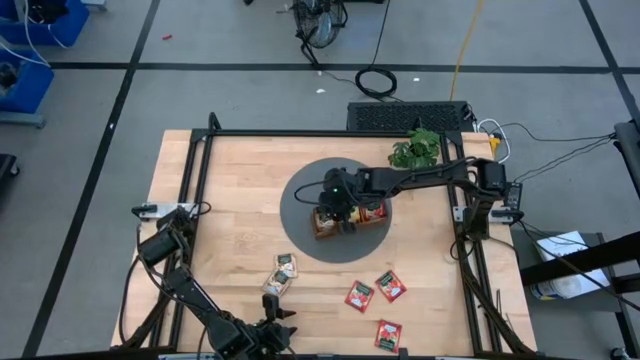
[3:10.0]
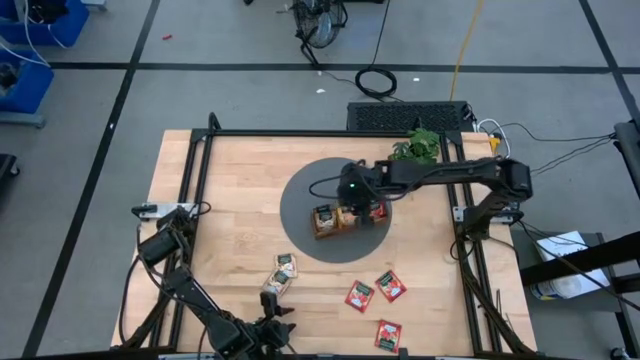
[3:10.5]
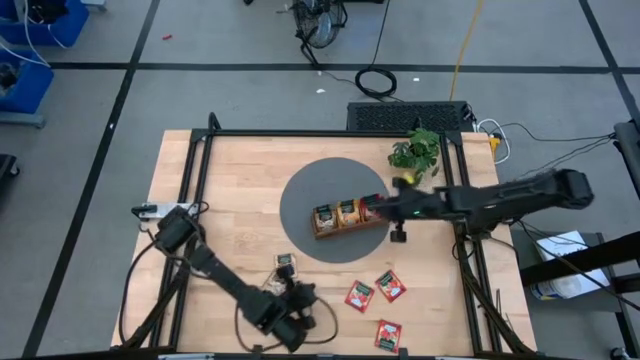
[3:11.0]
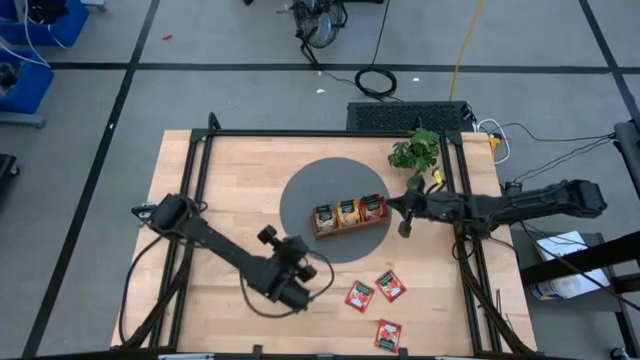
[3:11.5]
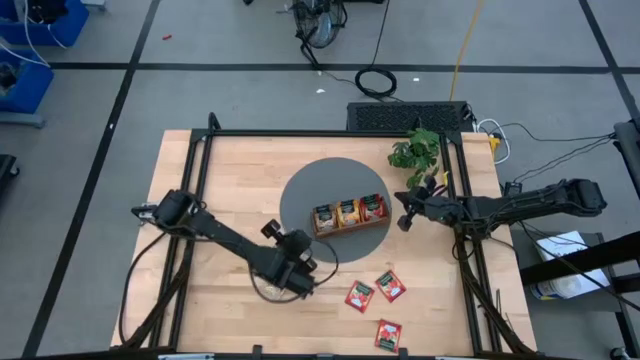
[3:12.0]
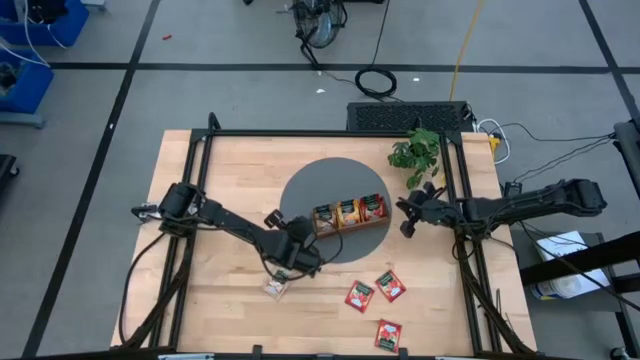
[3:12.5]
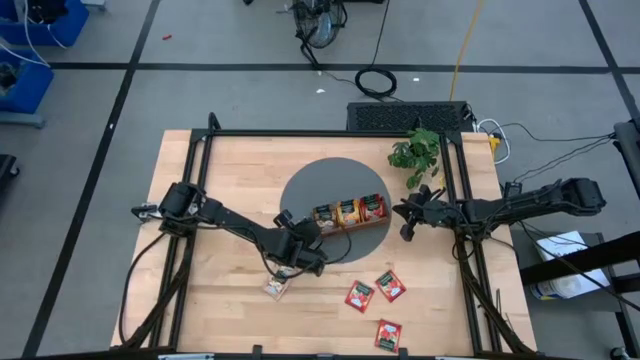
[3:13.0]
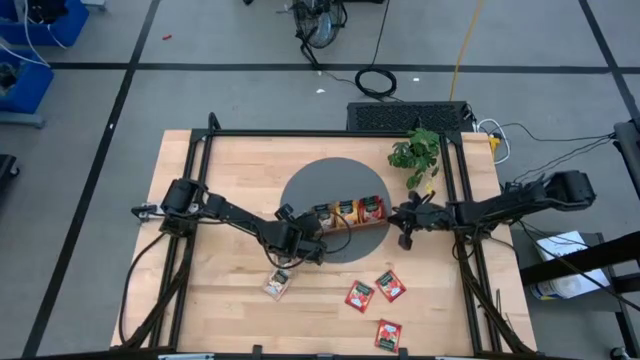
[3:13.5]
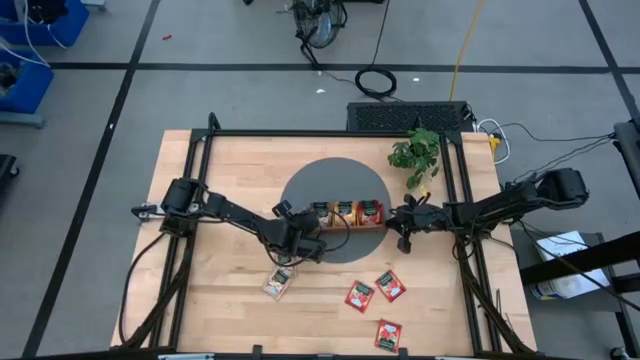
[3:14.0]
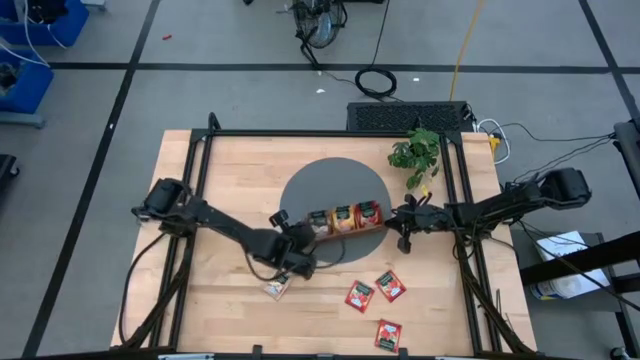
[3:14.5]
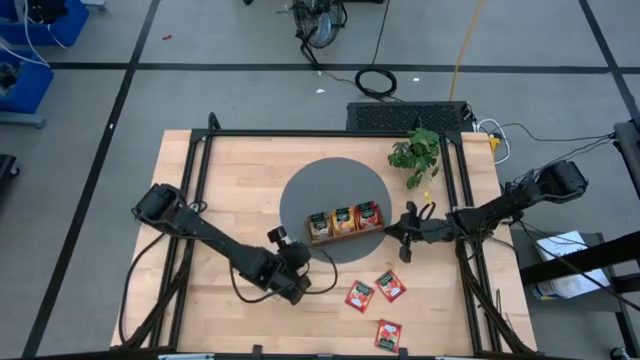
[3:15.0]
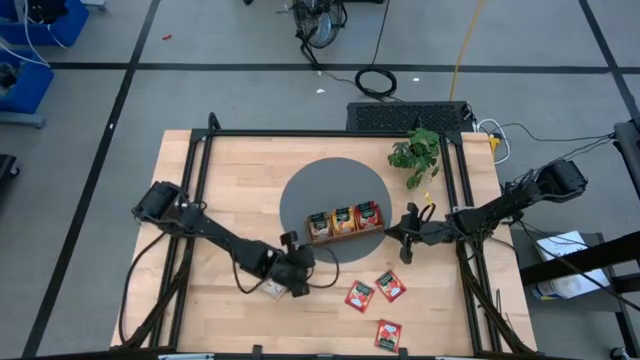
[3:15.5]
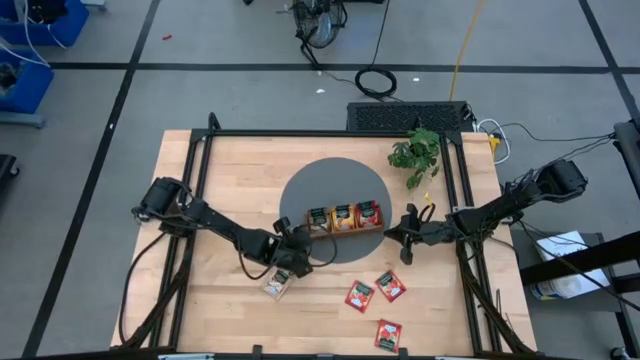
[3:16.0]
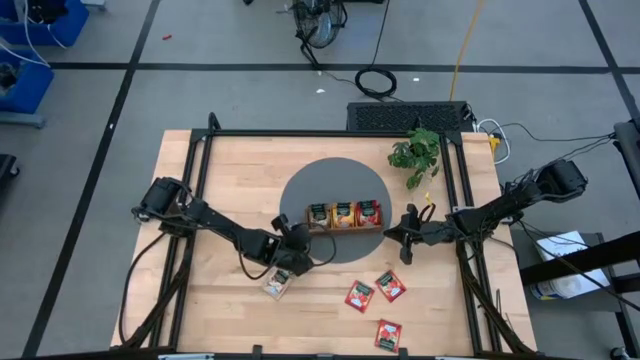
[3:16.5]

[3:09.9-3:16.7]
Task: Pick & Place Tea
Adjust the wooden organizer on the mat

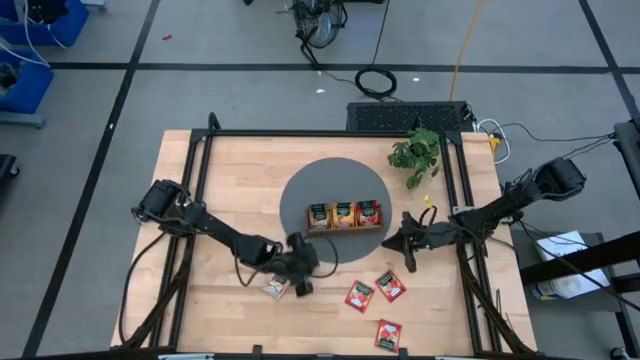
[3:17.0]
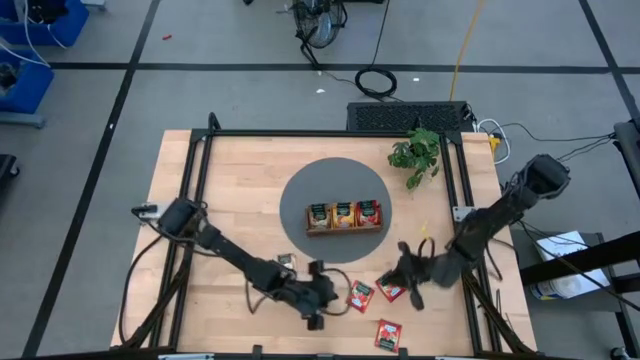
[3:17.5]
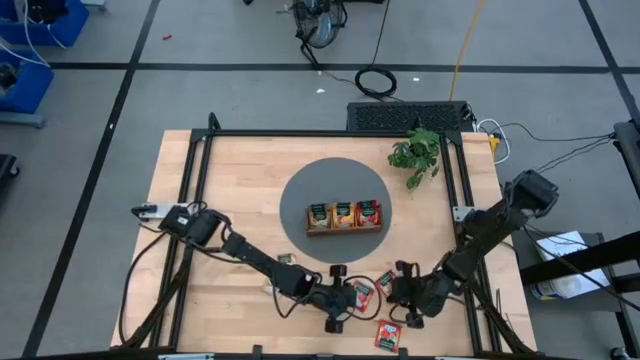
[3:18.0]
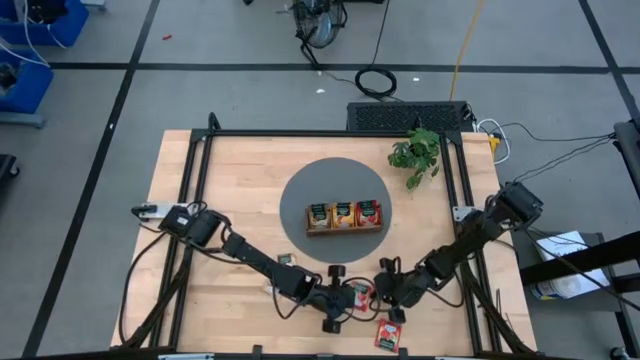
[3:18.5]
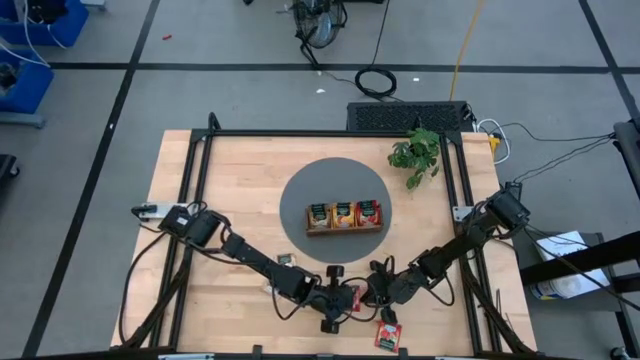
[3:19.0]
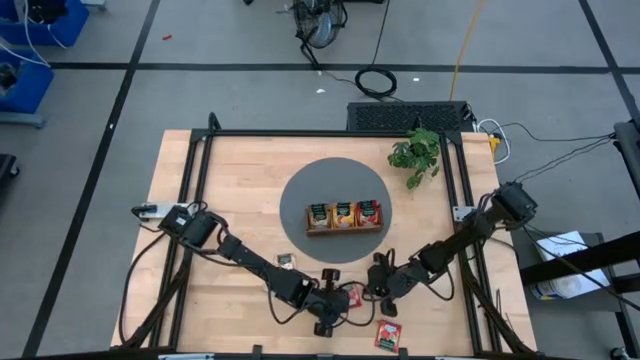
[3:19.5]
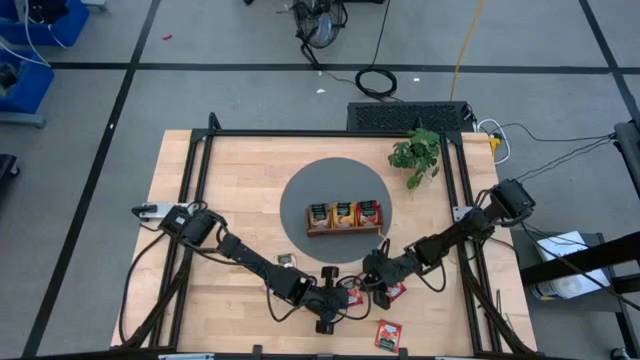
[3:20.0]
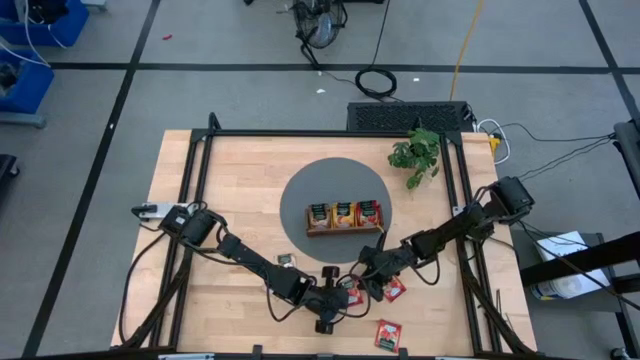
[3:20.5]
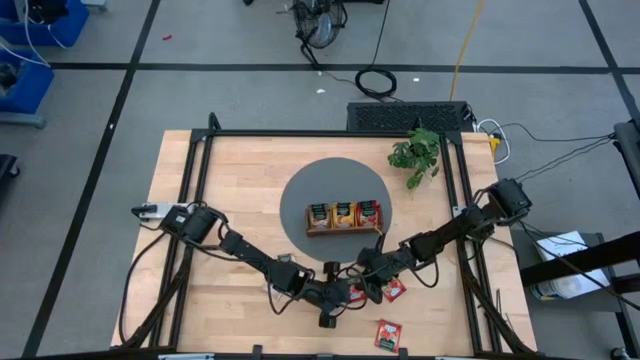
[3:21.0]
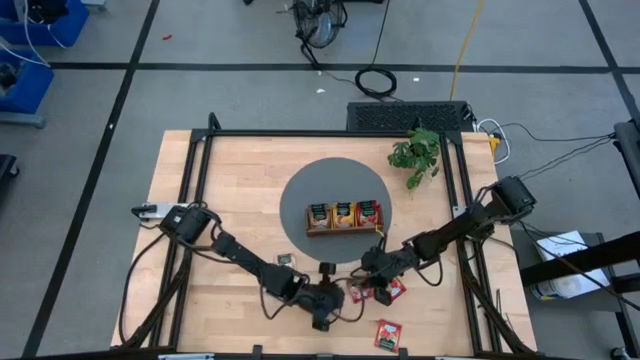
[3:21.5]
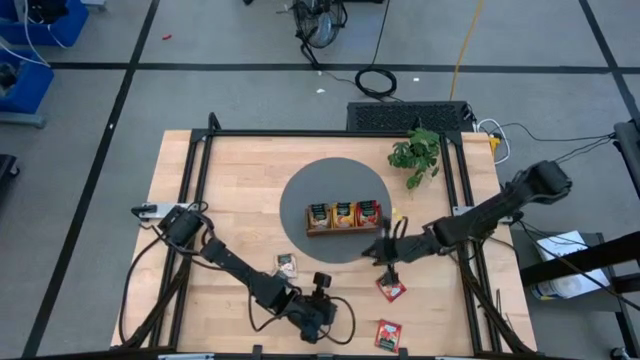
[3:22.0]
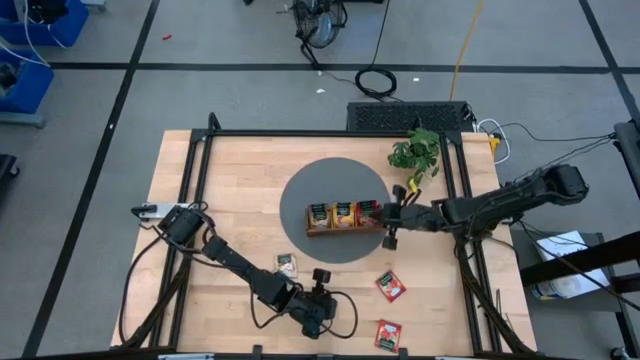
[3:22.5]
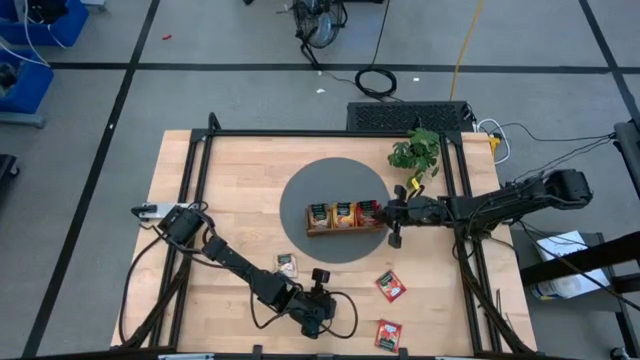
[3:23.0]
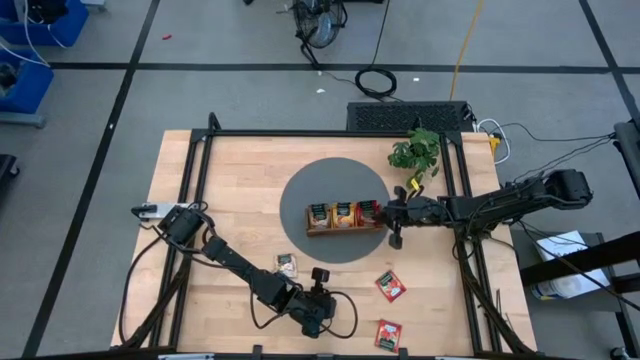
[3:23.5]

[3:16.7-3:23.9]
Put the top left red tea bag into the right slot of the wooden organizer

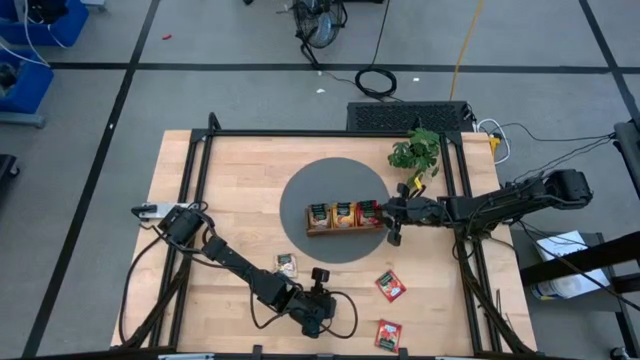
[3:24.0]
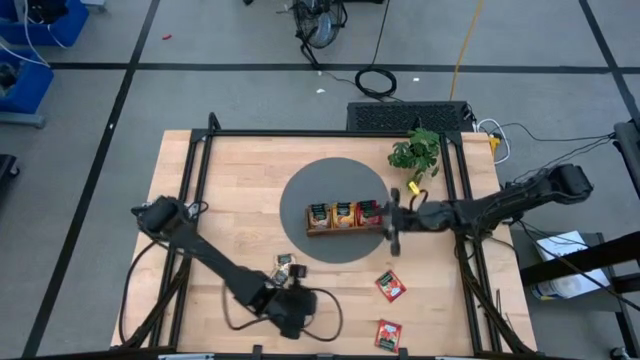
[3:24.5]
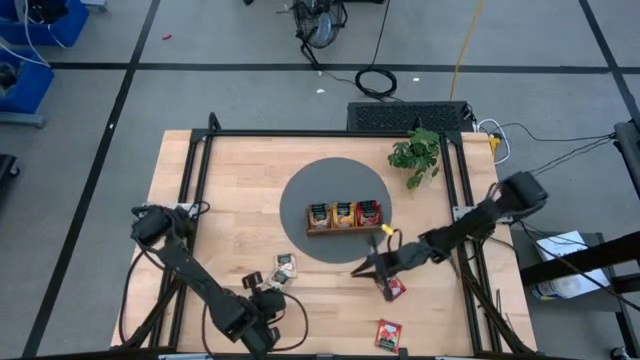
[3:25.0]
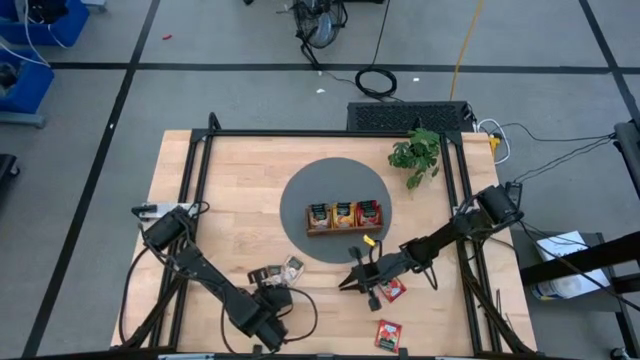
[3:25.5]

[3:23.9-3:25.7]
Put the top brown tea bag into the left slot of the wooden organizer

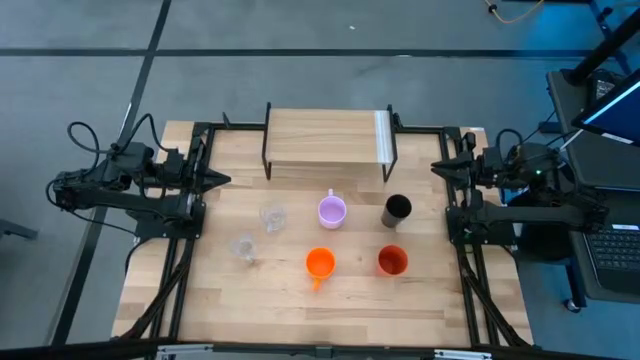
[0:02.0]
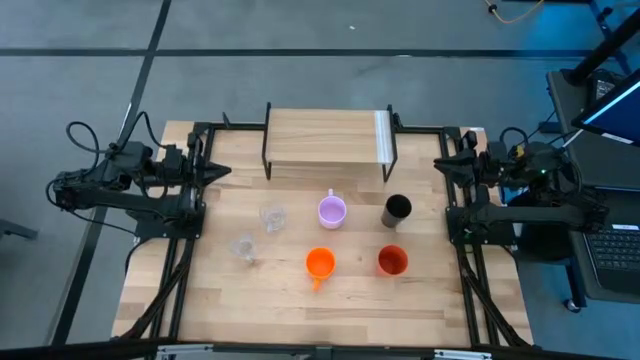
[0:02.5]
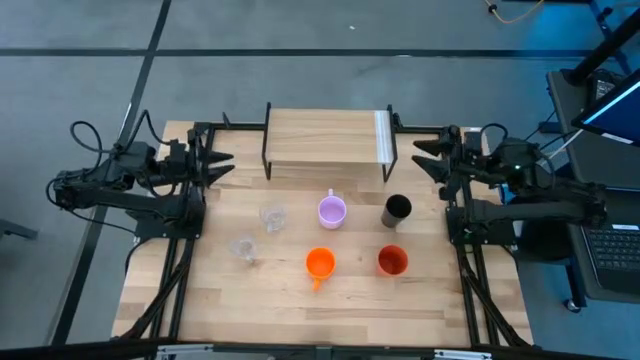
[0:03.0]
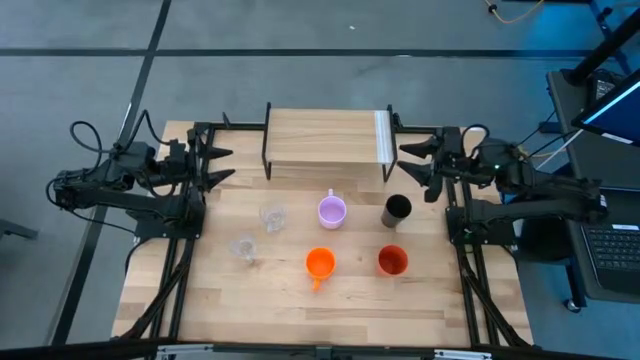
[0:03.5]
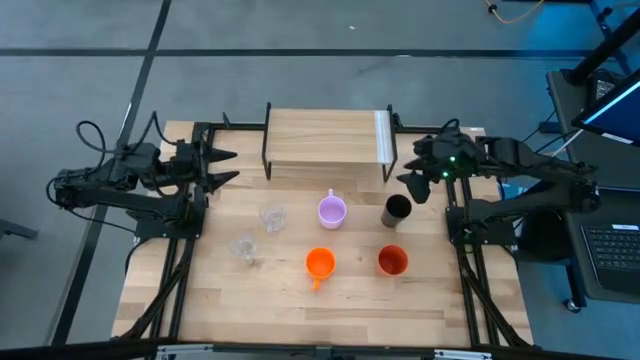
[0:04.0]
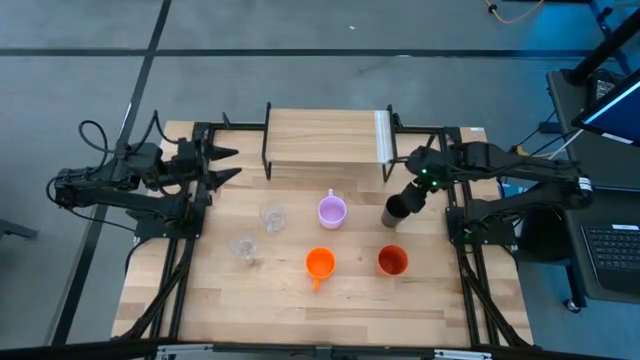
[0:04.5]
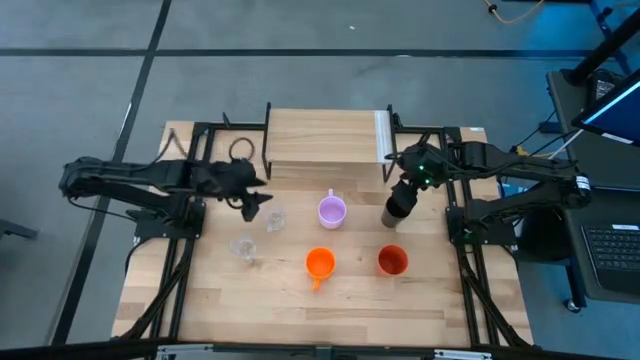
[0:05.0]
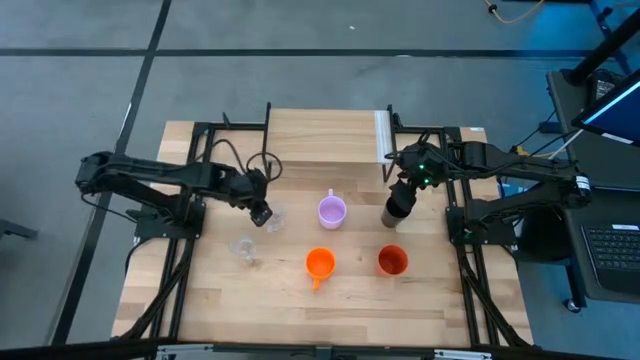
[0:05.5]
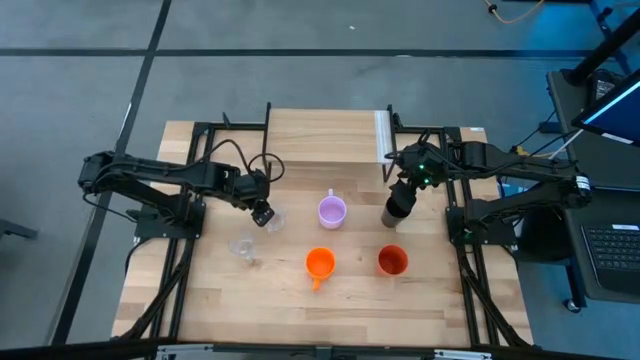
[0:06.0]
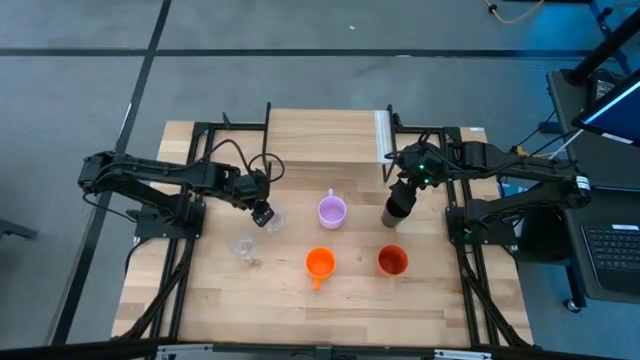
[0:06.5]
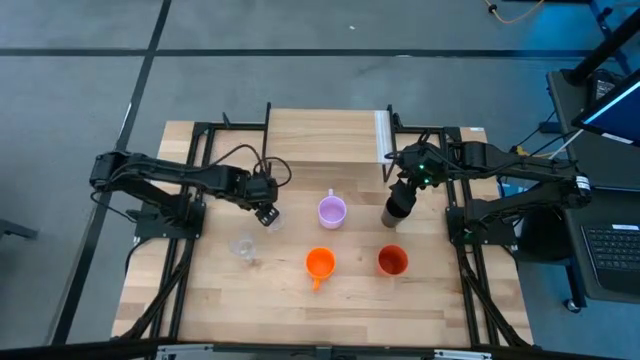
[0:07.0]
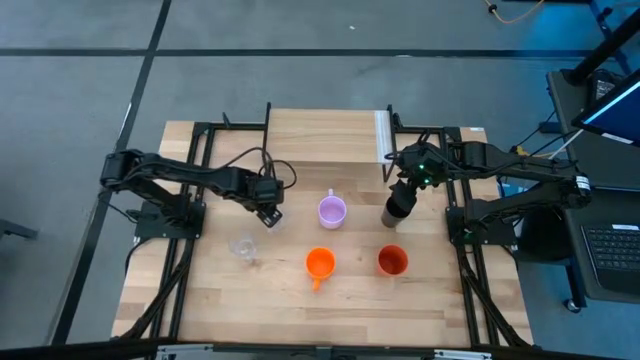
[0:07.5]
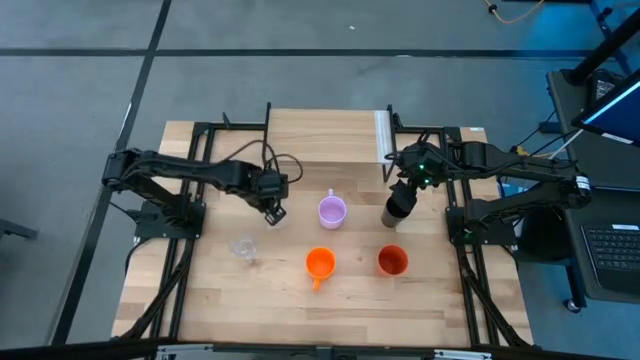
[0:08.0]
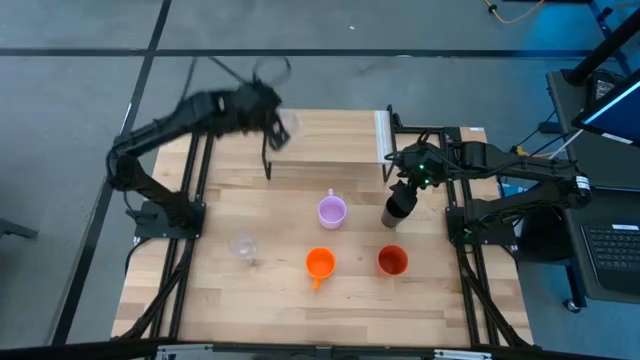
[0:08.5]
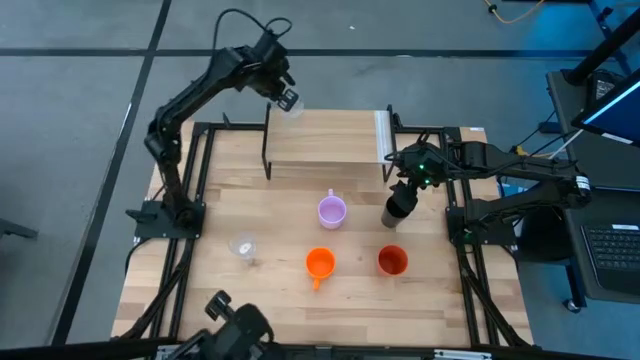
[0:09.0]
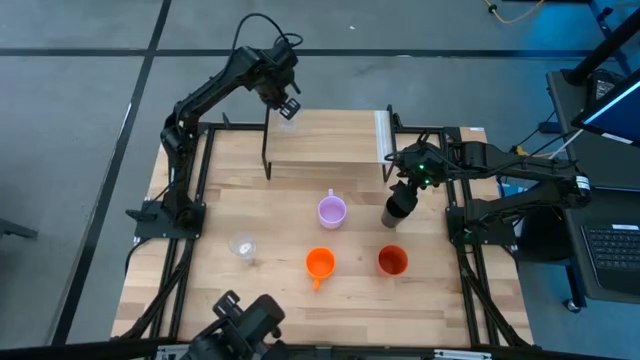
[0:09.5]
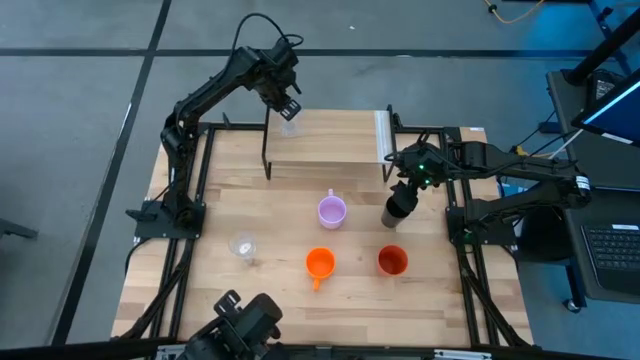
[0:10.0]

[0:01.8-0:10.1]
Task: Stack small to large cups/mugs on shelf
Put the top transparent mug on the shelf
